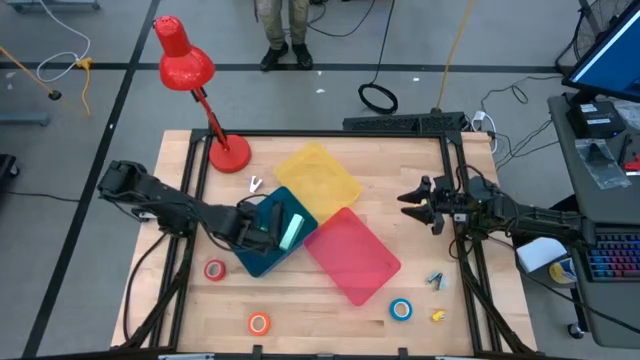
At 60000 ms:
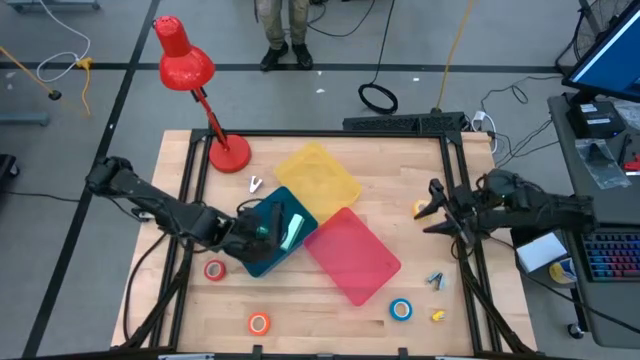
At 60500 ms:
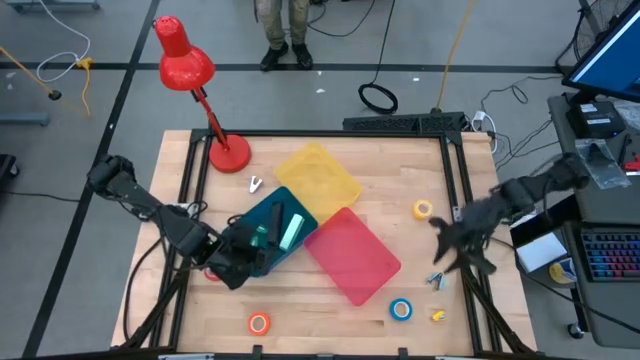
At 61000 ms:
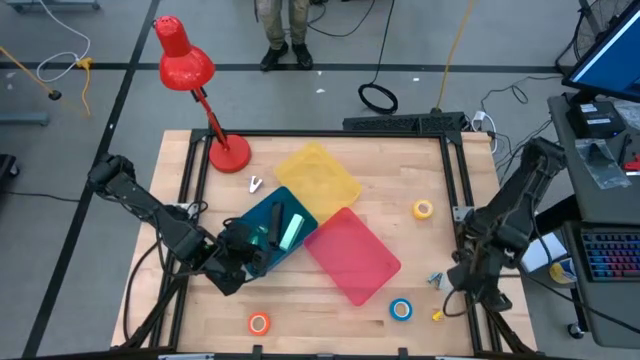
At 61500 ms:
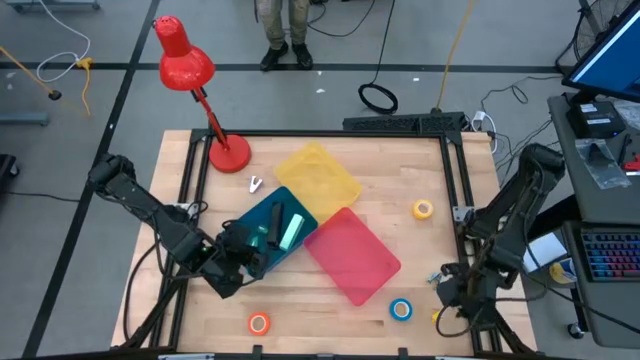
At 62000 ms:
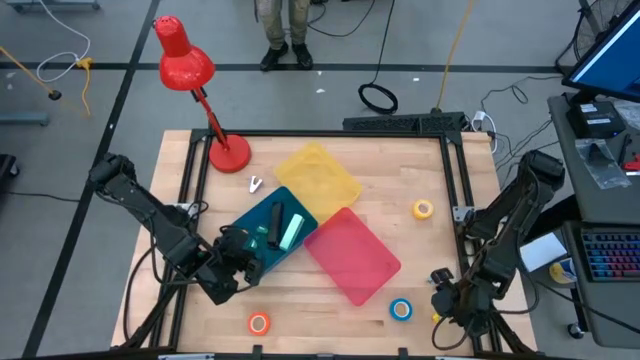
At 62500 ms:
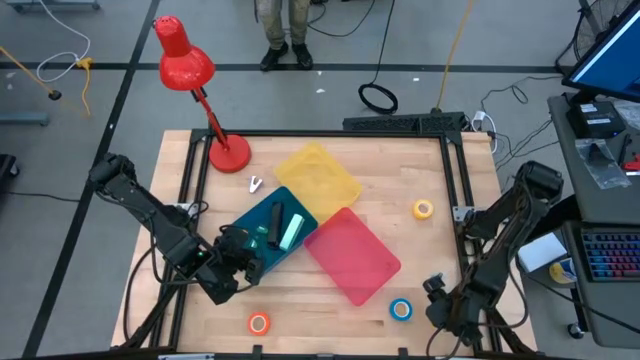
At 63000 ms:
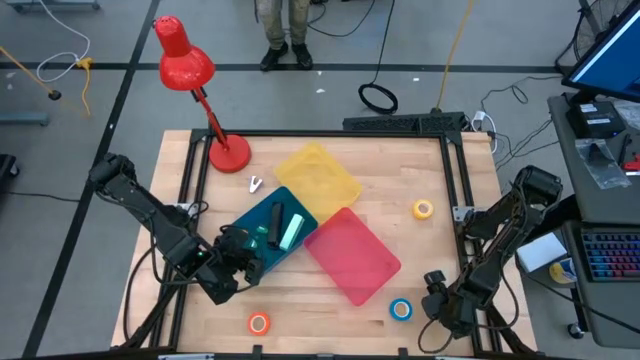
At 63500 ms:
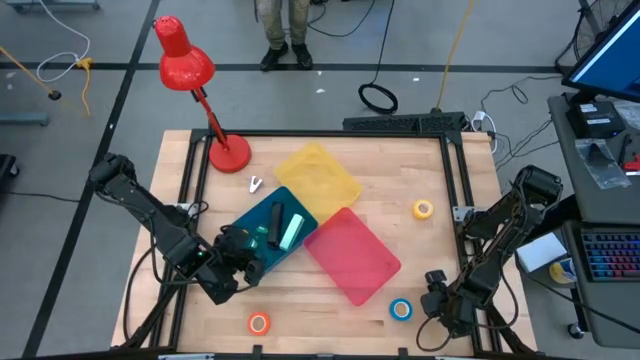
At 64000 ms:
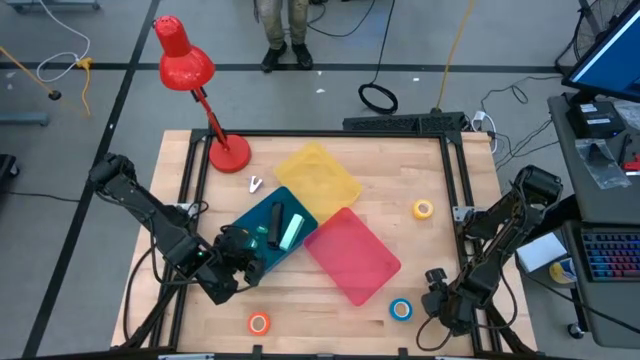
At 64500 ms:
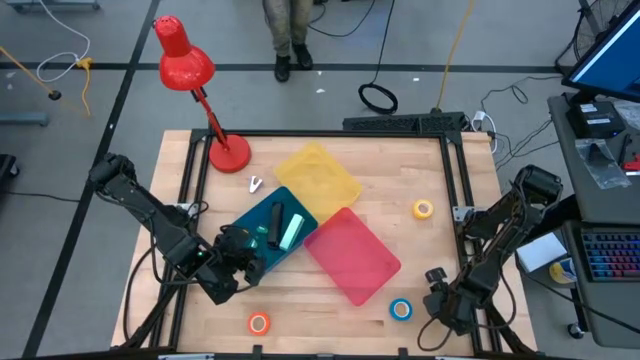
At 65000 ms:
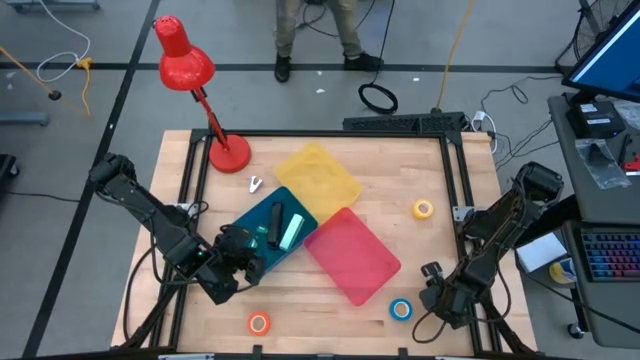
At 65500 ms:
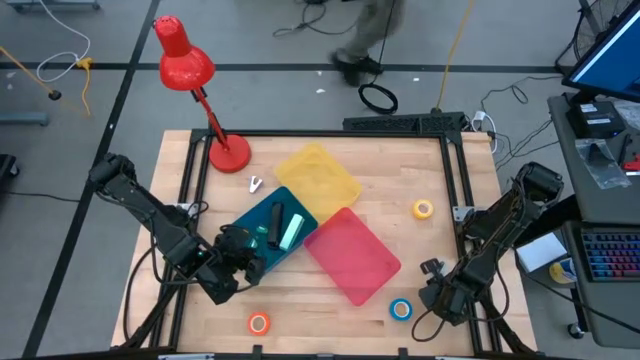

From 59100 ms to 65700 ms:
Task: Pick and place Stapler, Stapler remover, tape
Put the yellow stapler into the blue bin

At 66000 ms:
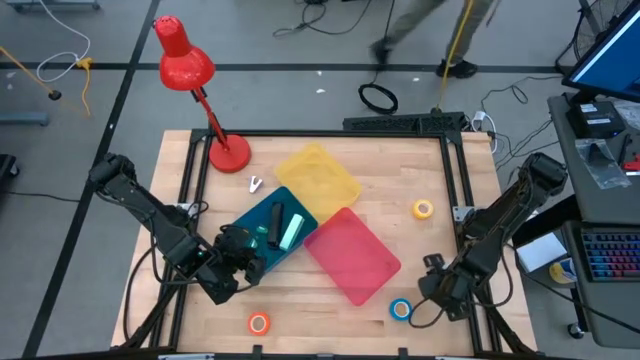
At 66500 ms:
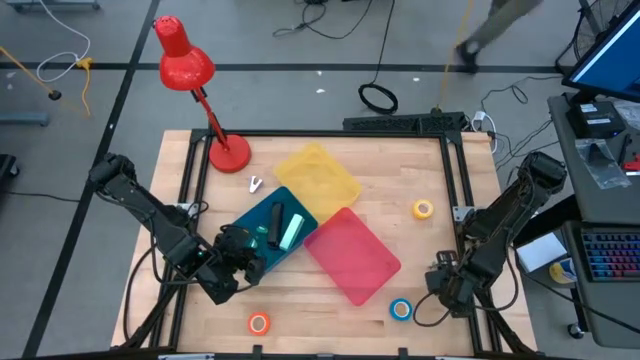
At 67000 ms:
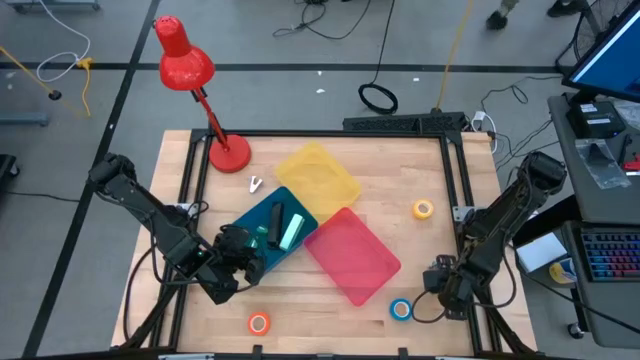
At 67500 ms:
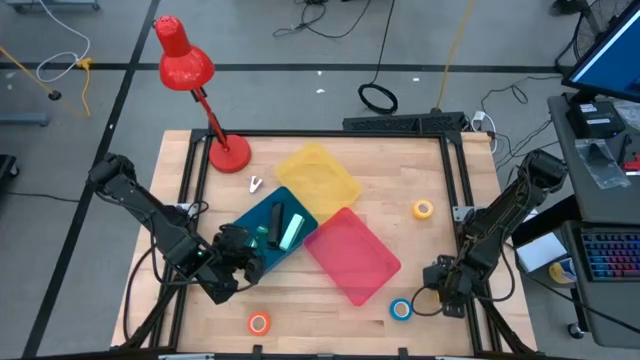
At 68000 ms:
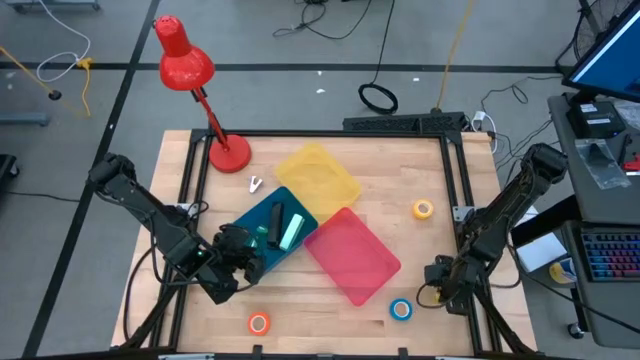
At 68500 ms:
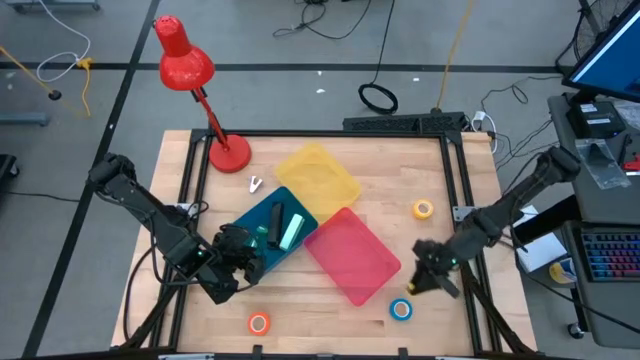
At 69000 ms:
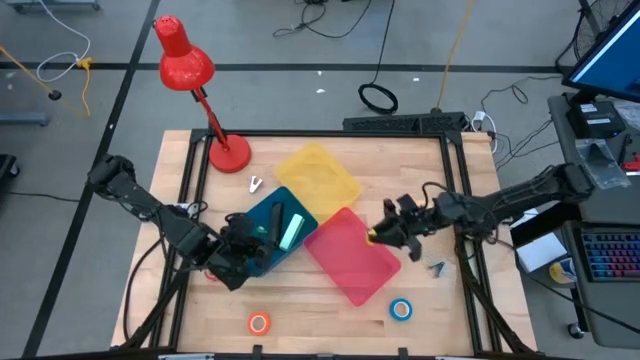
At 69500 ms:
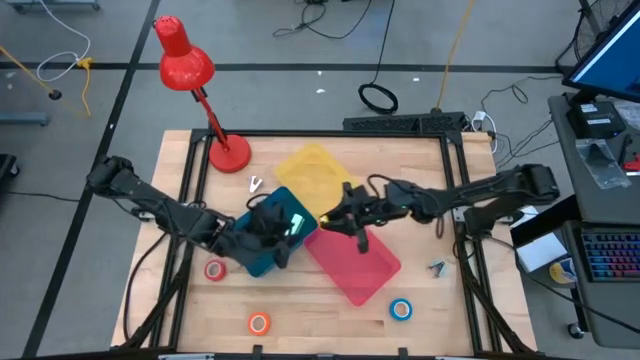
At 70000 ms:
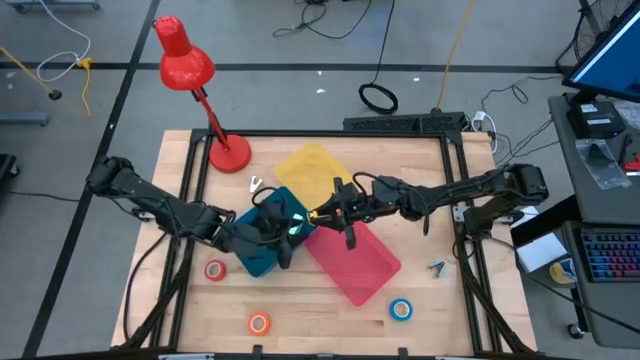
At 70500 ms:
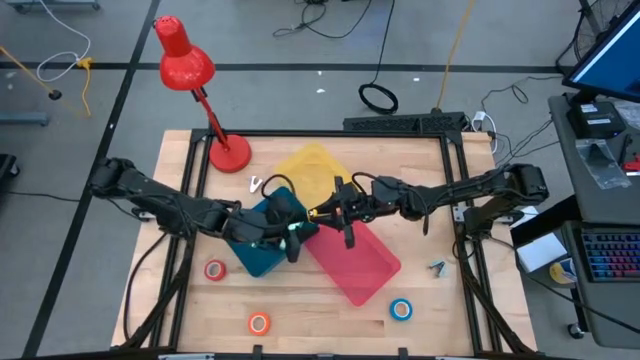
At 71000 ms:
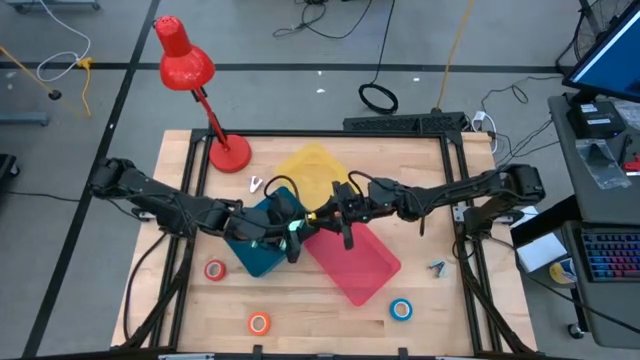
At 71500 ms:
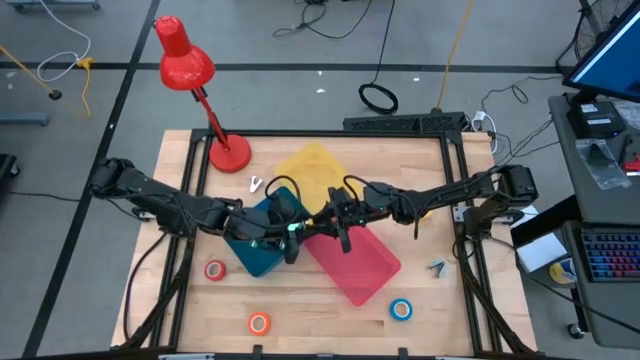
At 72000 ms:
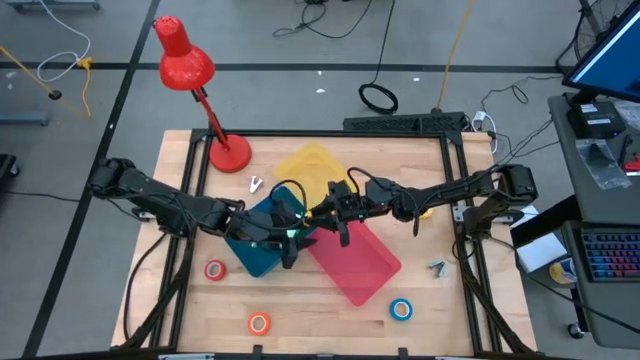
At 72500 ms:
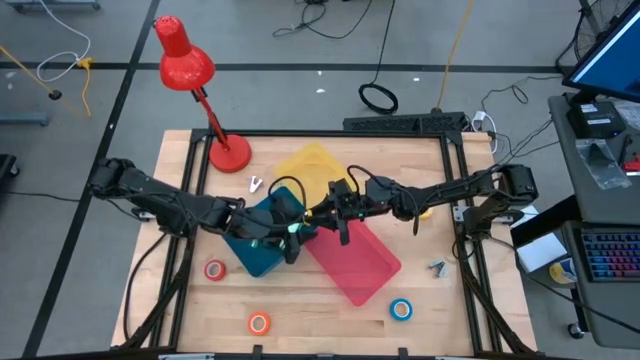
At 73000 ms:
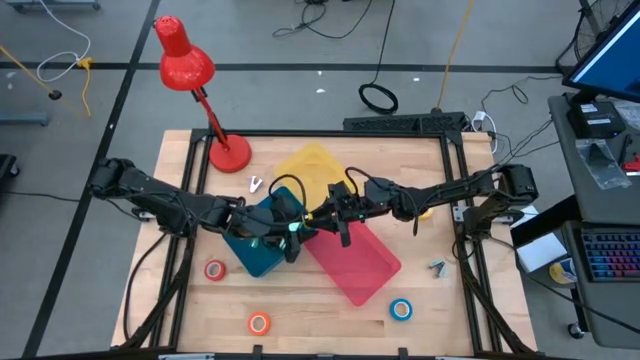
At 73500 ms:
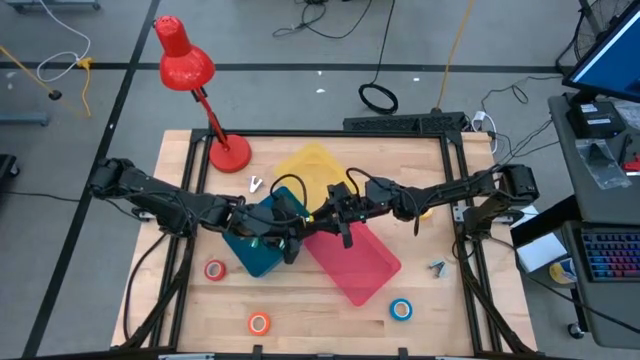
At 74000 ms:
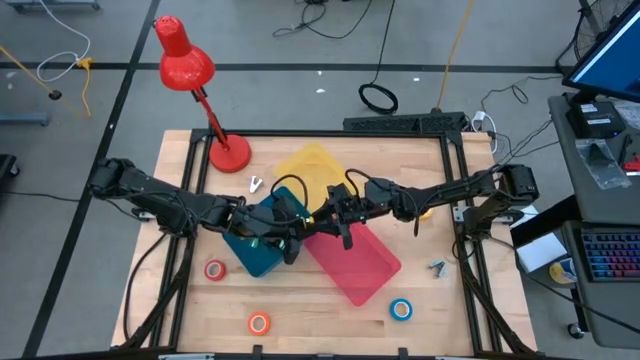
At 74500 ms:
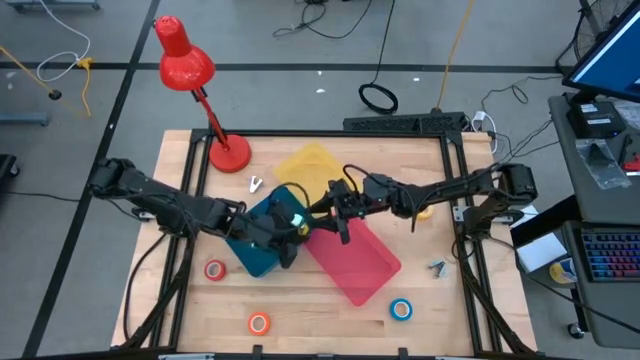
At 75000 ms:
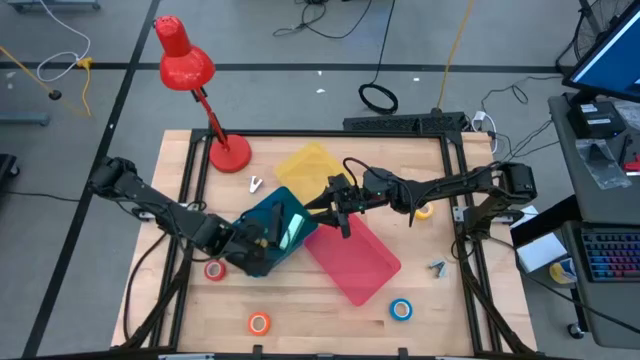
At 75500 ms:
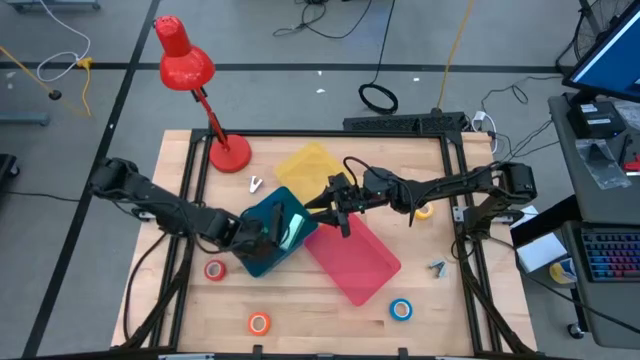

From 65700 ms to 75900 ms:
Put the yellow stapler into the blue bin

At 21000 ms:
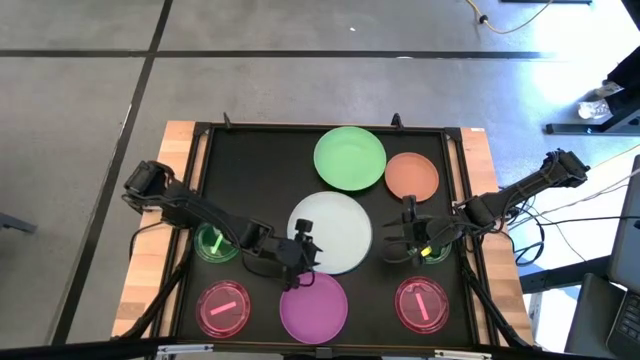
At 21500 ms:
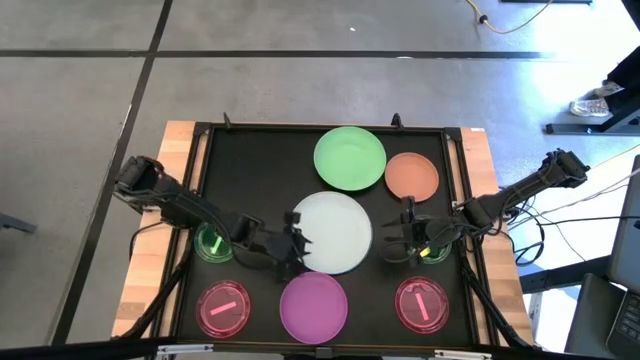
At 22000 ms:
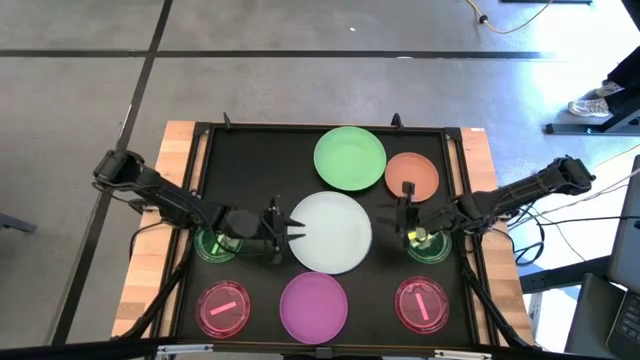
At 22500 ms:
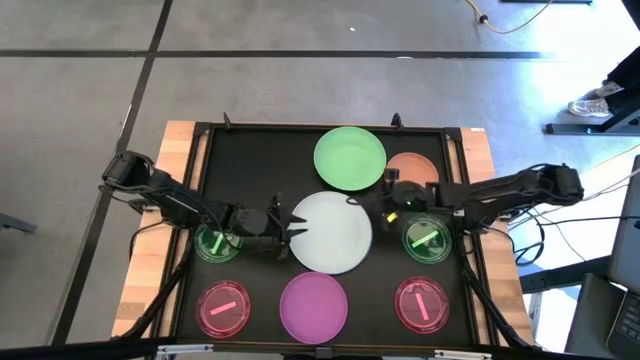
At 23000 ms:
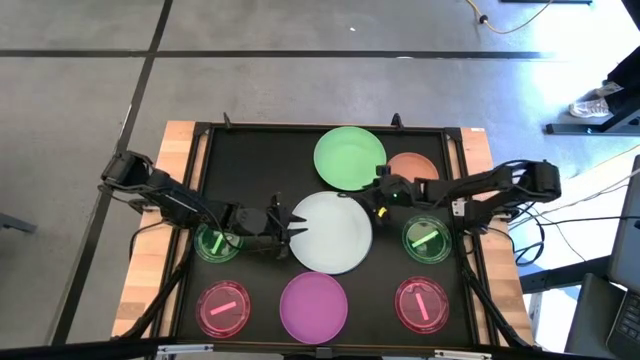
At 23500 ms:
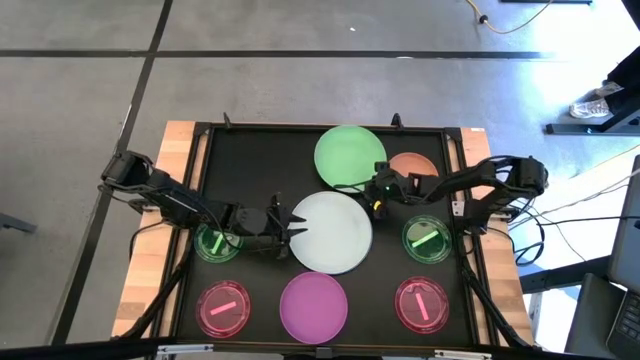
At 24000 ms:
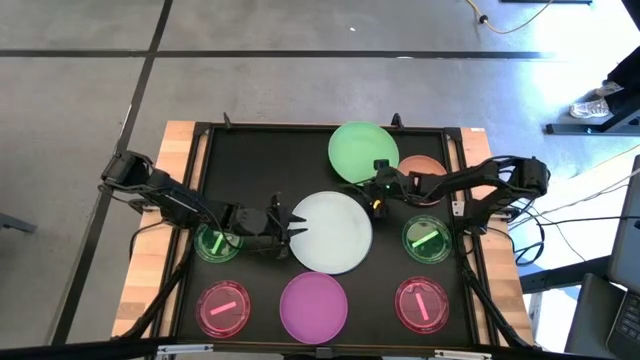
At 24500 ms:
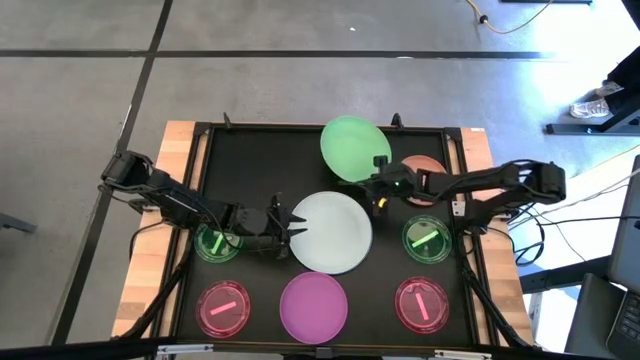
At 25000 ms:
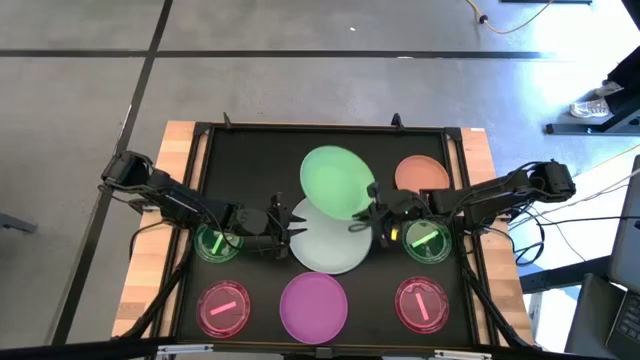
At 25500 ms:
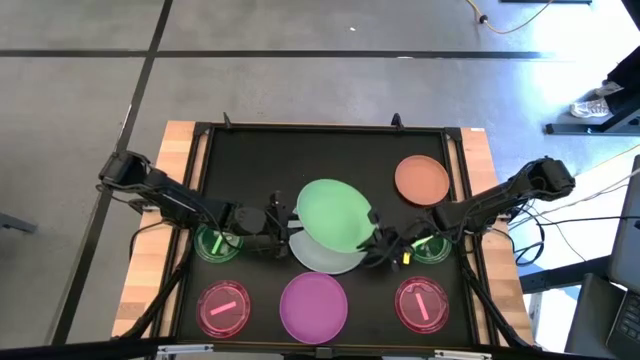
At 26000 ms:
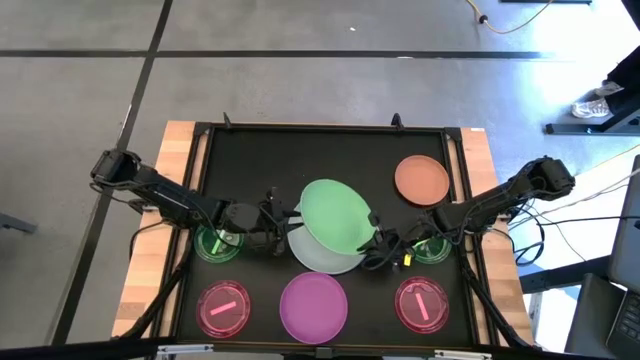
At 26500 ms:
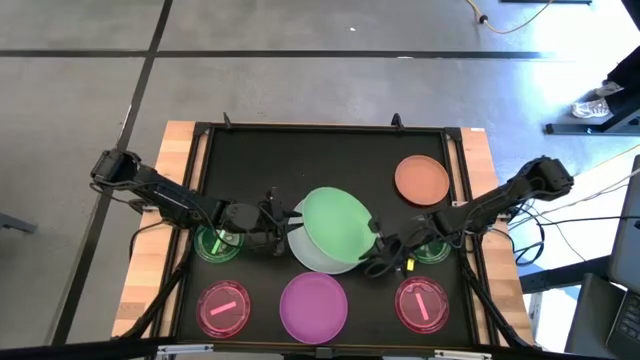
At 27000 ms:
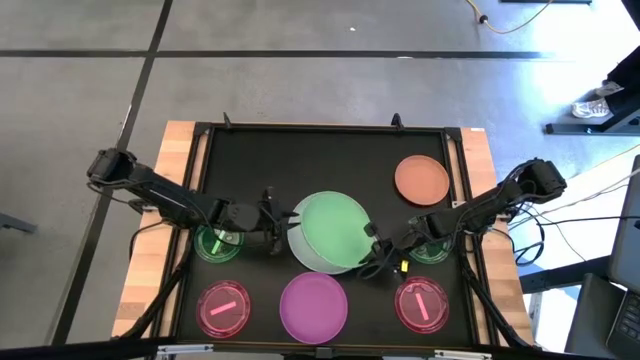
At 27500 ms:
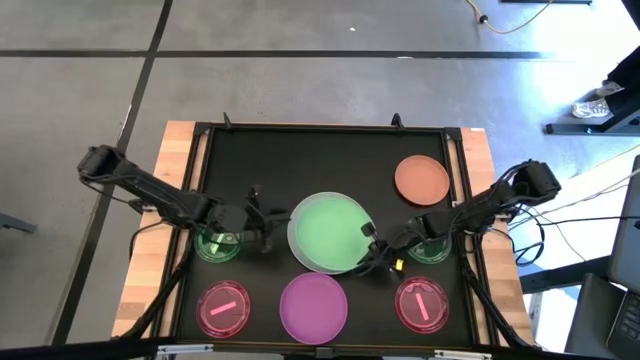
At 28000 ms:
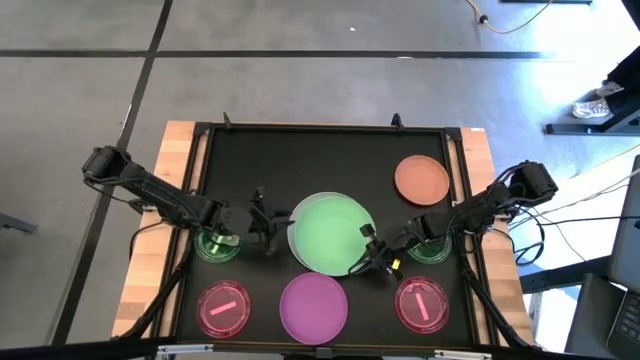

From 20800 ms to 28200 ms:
Task: Stack plastic plates
Stack the green plate on the light blue plate
